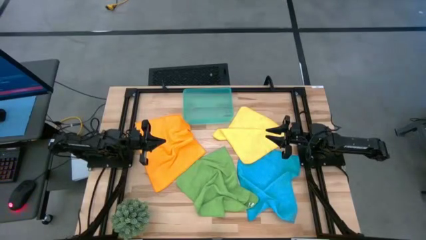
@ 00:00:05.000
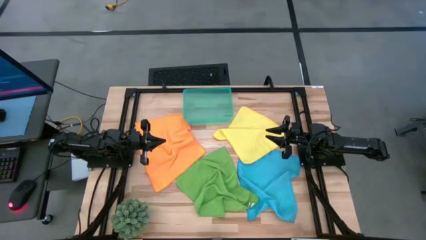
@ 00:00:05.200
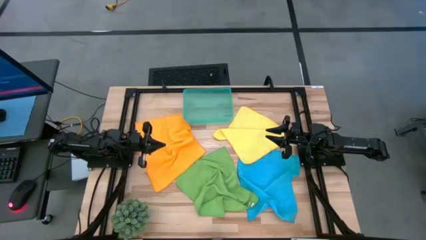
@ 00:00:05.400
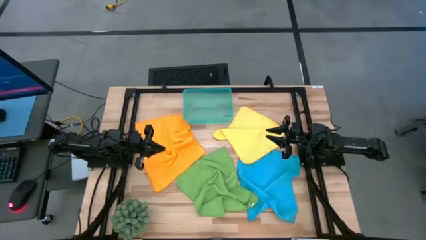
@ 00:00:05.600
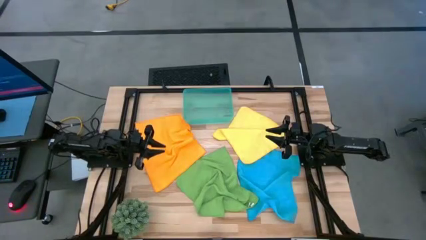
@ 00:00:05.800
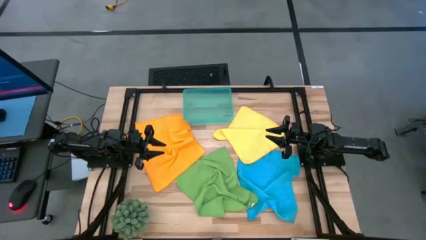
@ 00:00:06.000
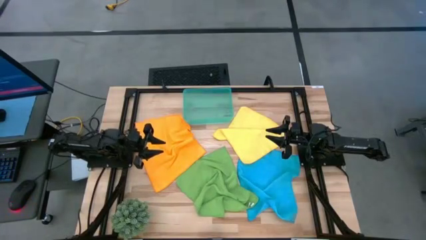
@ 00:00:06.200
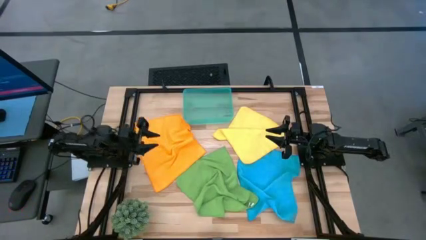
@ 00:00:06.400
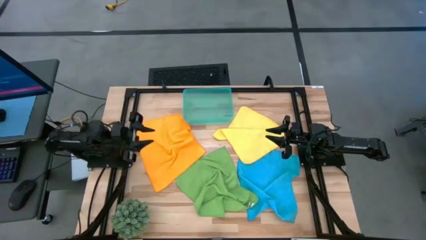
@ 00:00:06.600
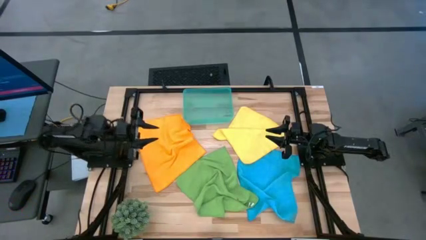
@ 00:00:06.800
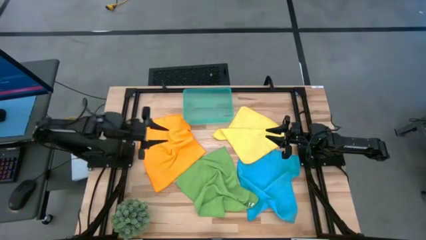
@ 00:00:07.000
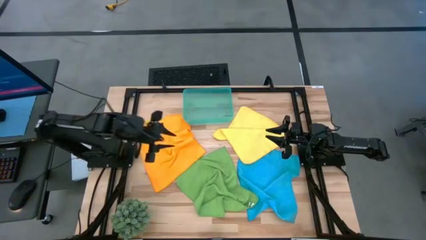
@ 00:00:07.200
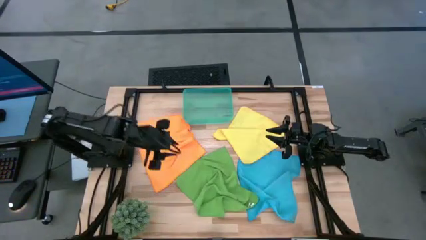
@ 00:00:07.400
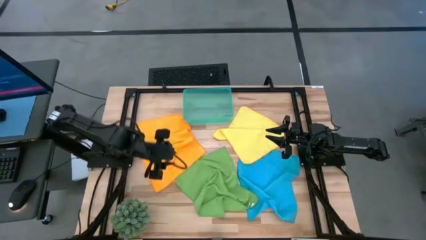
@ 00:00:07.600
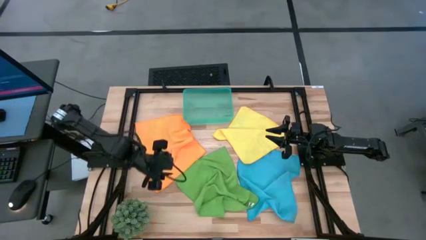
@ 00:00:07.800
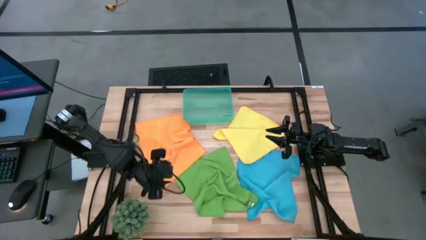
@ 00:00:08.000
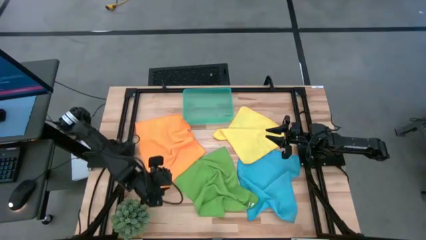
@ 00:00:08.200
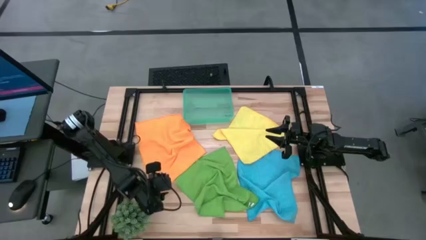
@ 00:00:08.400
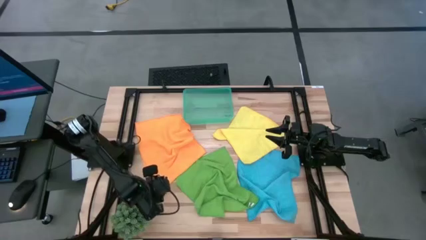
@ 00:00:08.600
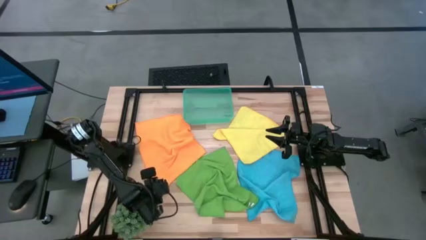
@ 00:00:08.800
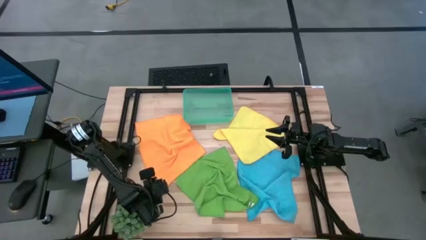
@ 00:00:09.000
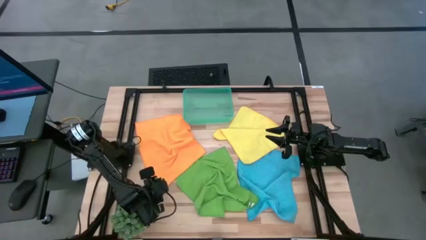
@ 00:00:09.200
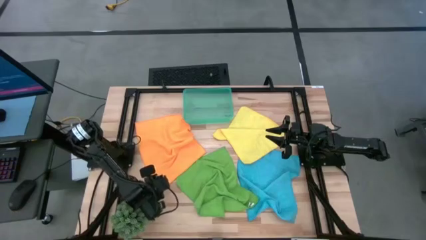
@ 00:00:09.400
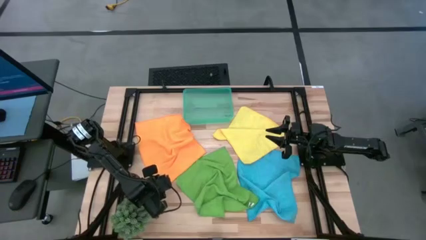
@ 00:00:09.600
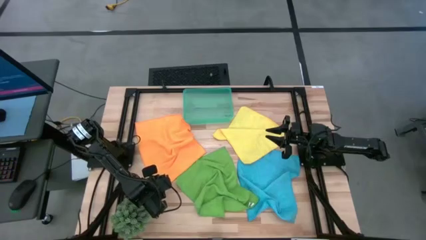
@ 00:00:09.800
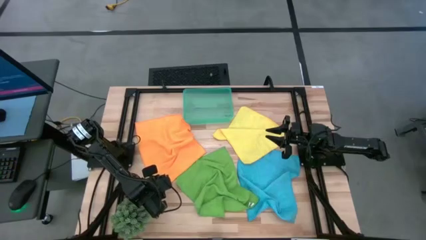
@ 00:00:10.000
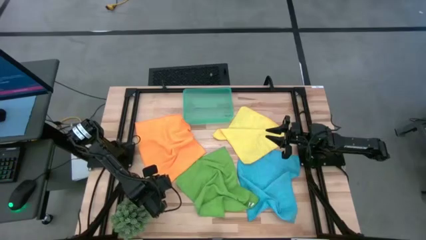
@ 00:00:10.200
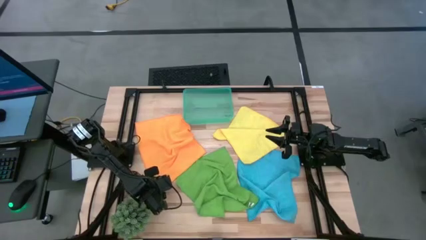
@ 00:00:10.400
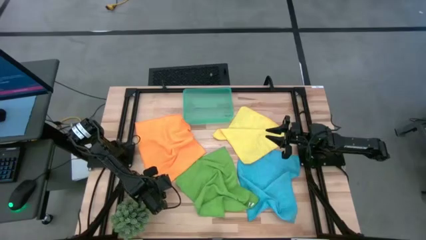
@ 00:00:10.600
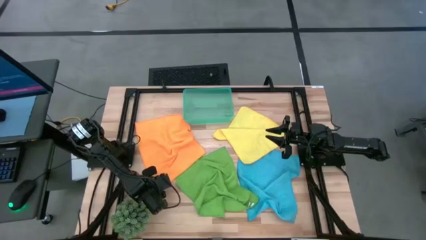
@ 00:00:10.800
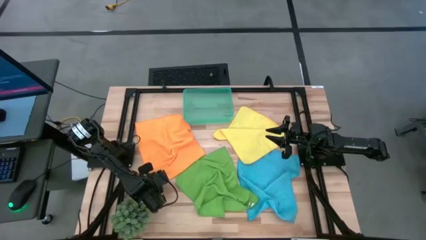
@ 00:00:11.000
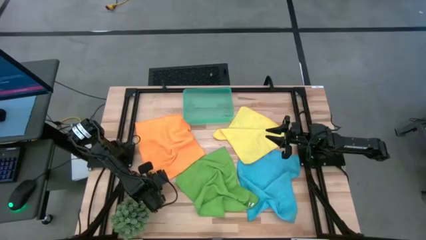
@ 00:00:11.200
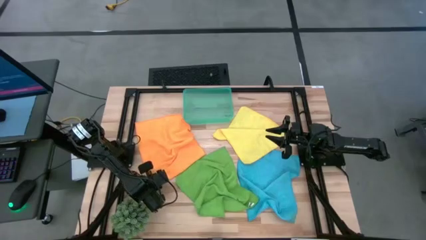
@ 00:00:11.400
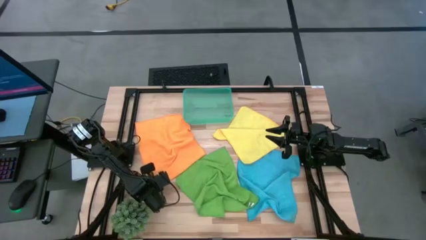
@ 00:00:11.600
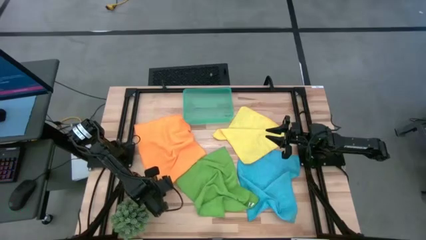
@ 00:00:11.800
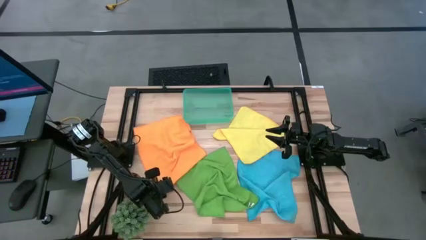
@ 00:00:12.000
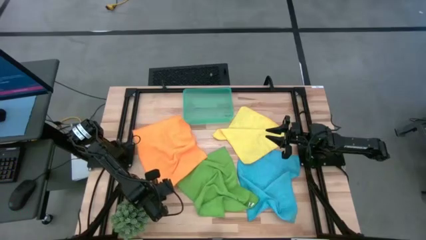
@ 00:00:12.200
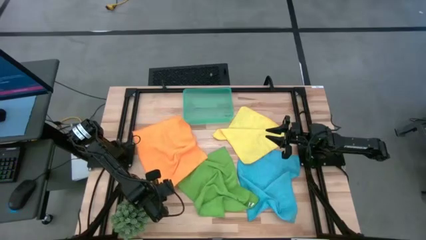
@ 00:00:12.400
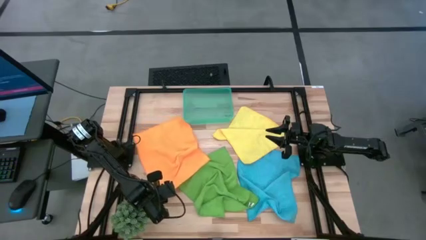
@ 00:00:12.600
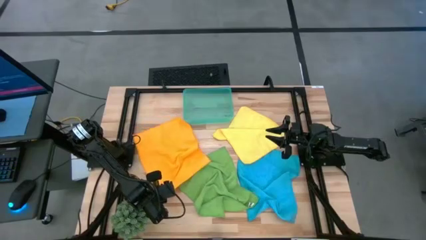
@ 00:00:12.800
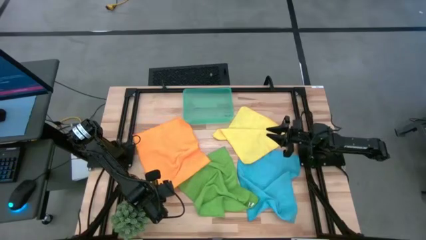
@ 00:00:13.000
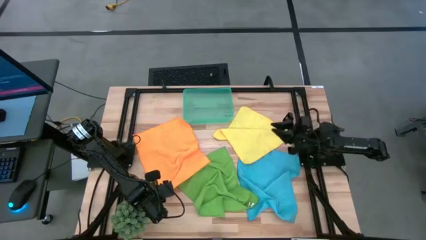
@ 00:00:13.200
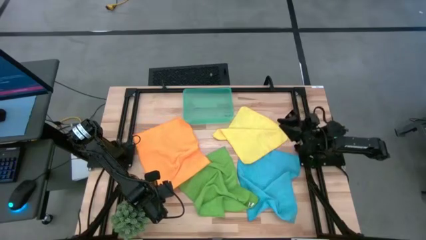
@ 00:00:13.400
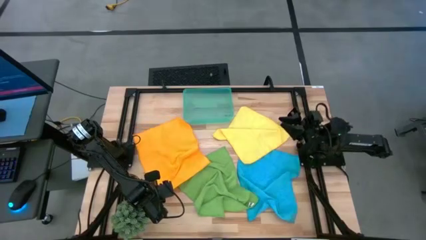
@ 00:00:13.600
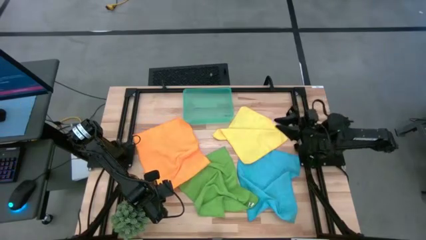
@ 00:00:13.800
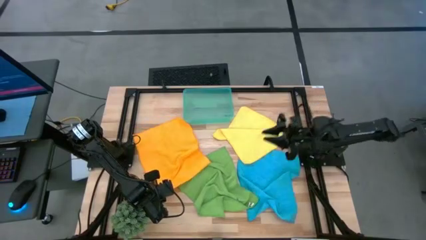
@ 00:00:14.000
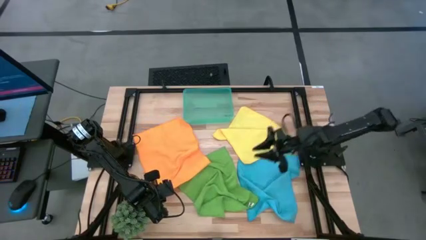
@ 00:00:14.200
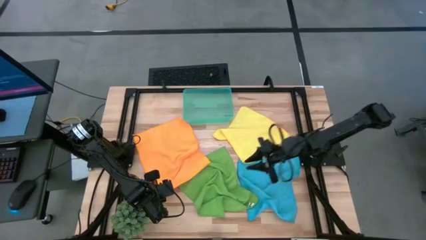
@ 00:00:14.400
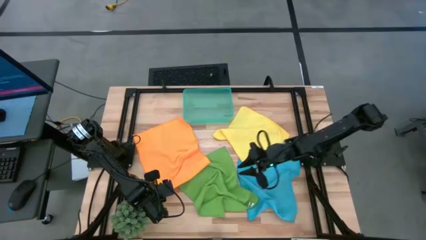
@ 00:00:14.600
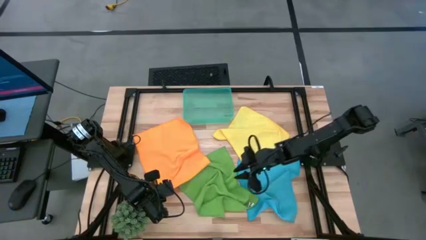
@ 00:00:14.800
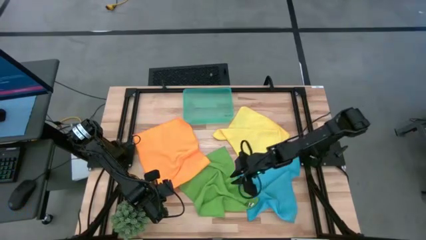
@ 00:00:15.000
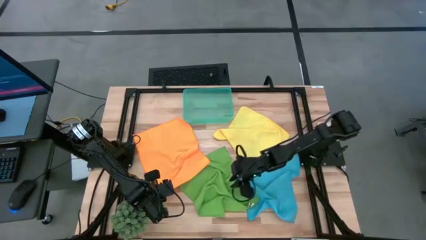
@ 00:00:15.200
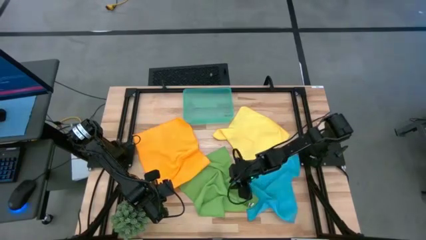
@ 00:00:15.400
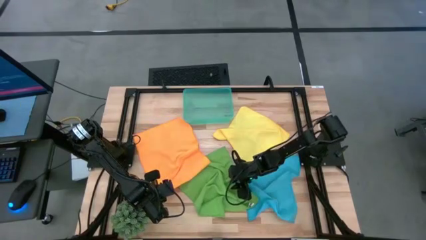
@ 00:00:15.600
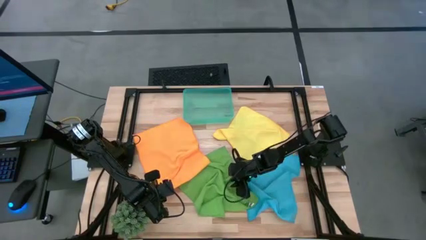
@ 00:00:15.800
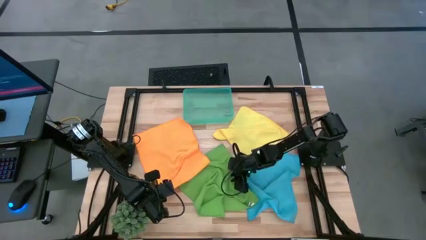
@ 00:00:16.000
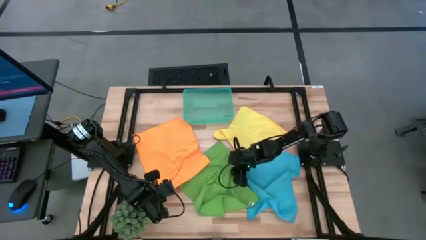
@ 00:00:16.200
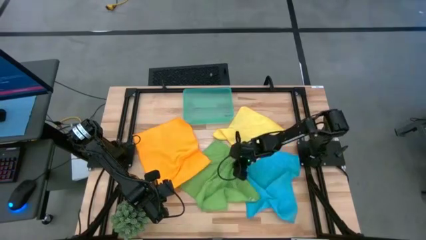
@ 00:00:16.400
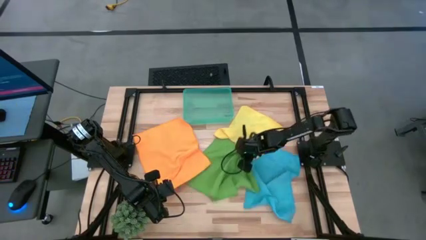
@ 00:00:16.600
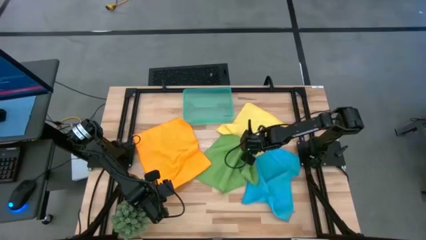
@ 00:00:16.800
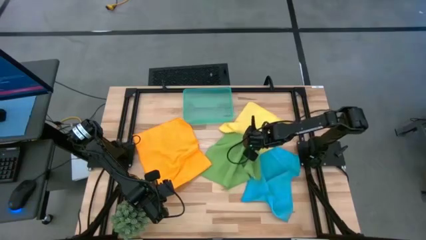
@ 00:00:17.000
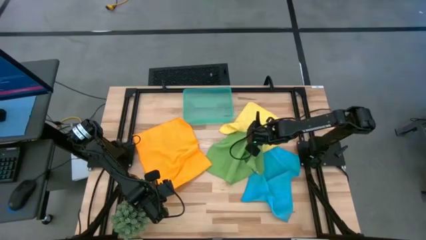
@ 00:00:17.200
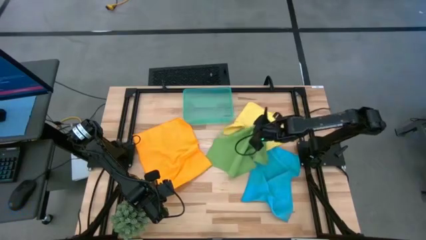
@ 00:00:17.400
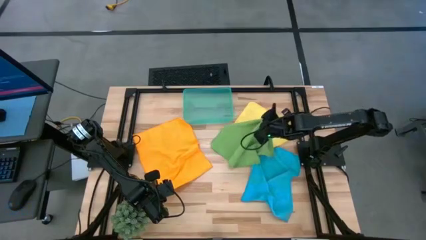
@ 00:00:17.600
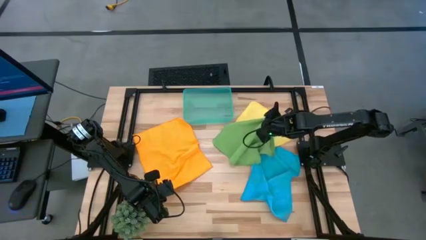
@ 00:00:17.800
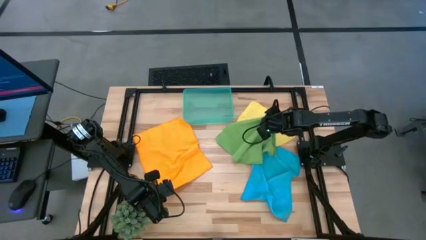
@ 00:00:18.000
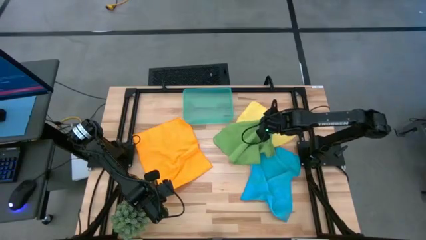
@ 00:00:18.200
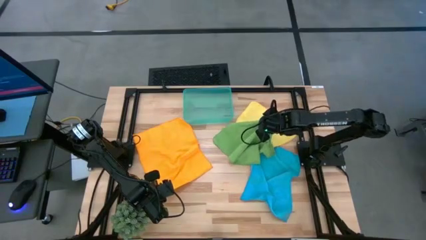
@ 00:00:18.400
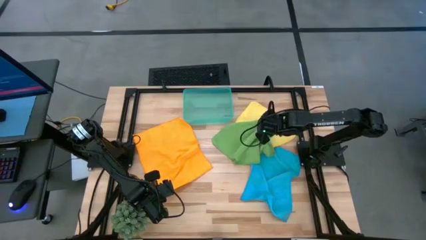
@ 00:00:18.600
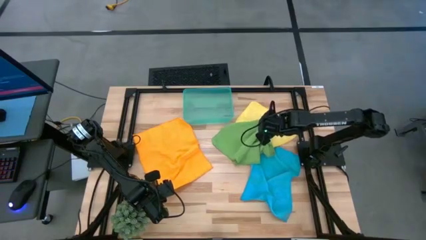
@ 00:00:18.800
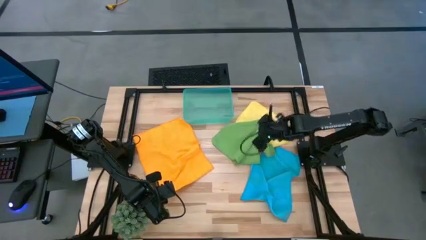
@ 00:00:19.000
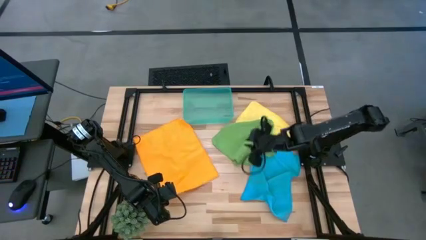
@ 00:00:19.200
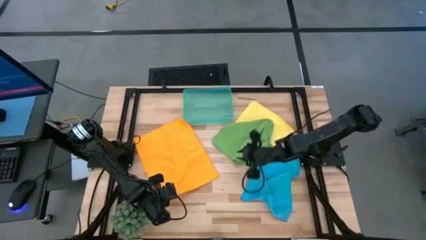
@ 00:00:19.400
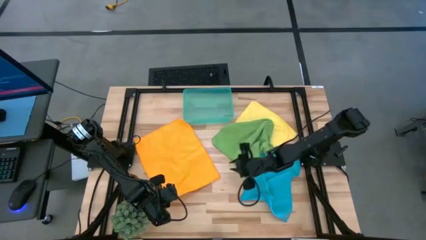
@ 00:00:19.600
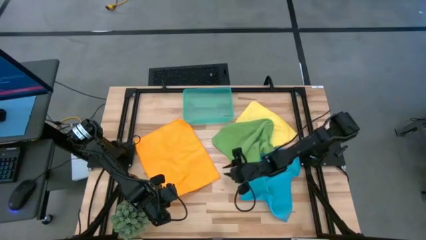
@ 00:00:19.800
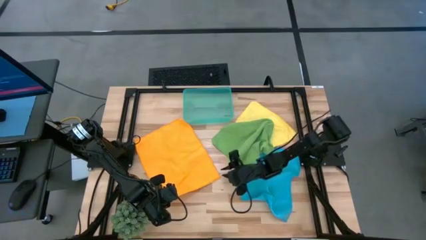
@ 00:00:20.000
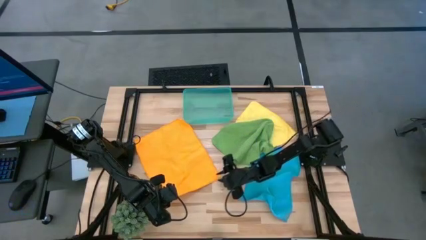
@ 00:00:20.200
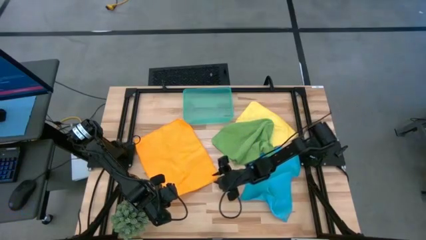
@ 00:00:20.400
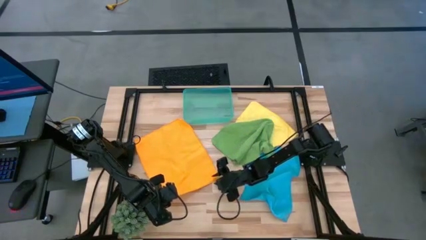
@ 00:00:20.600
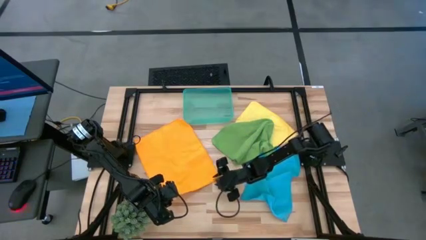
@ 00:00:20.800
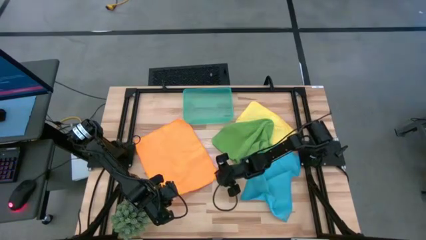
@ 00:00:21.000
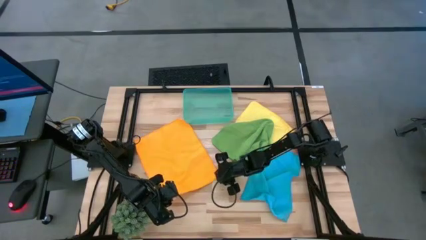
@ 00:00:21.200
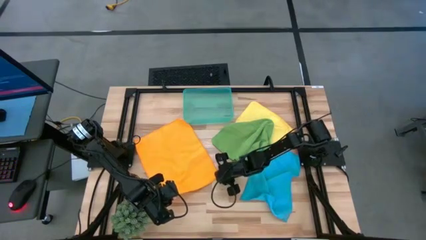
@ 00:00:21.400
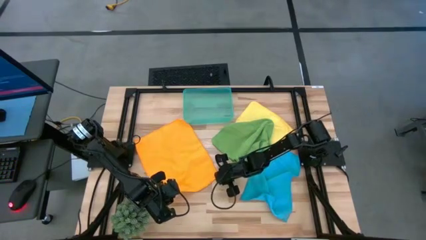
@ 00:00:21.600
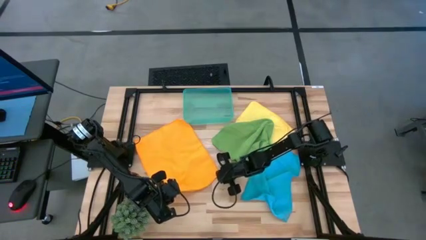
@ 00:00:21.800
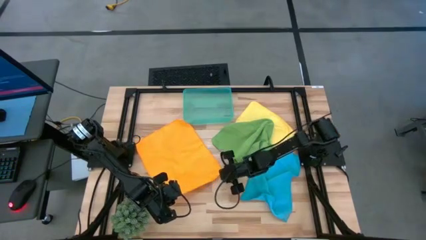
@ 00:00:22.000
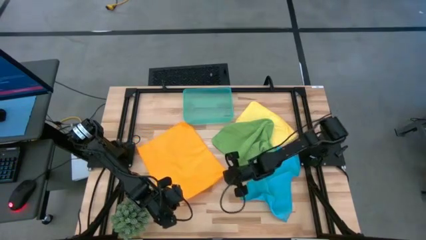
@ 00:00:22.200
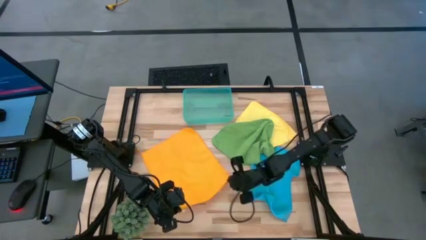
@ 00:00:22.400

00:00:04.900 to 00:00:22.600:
Task: Roll microfiber towels into tight, uniform cylinder then place into a basket
Fold the orange towel
